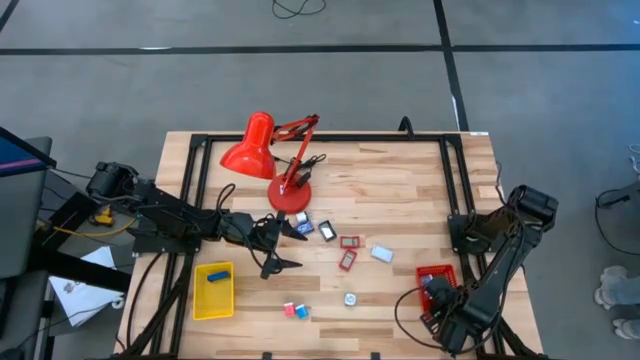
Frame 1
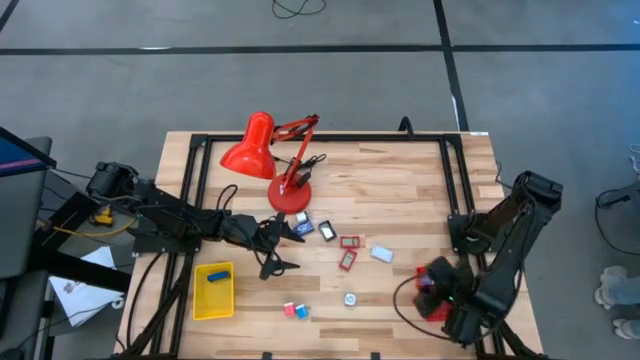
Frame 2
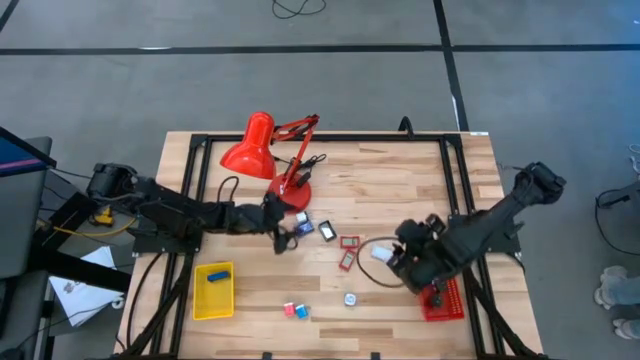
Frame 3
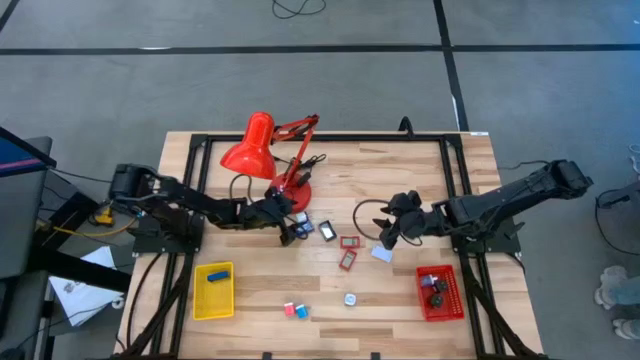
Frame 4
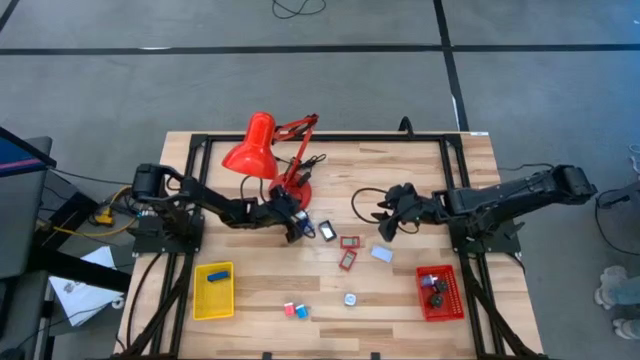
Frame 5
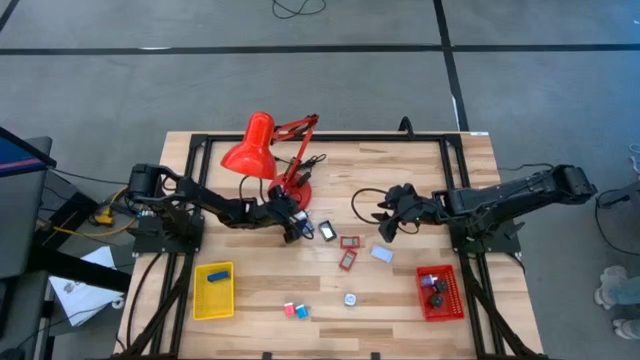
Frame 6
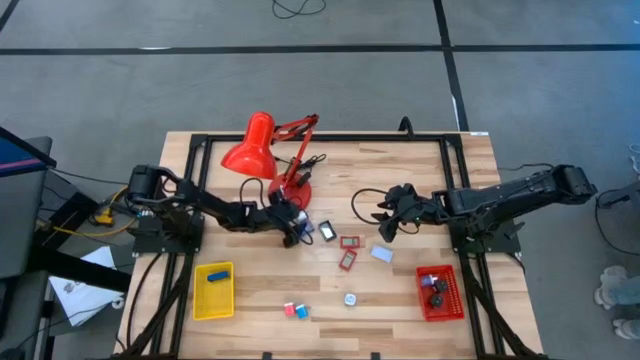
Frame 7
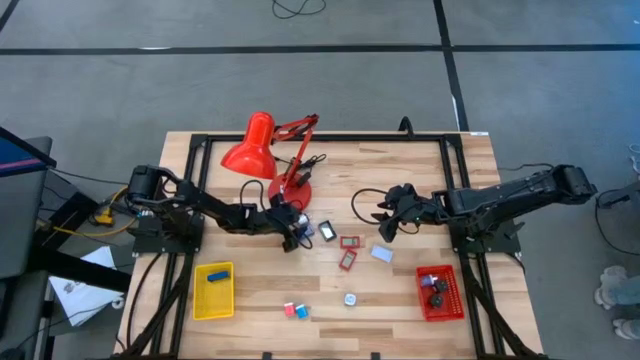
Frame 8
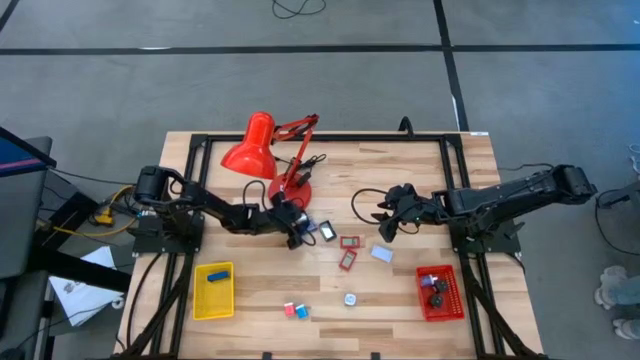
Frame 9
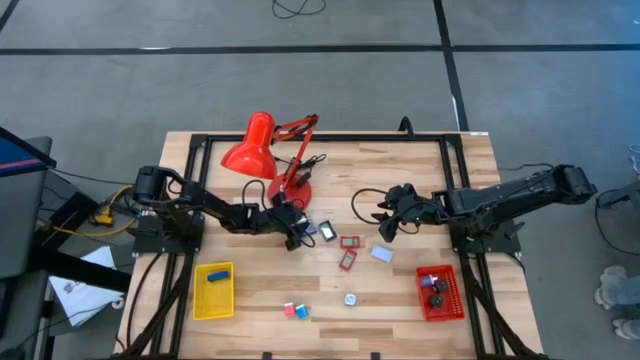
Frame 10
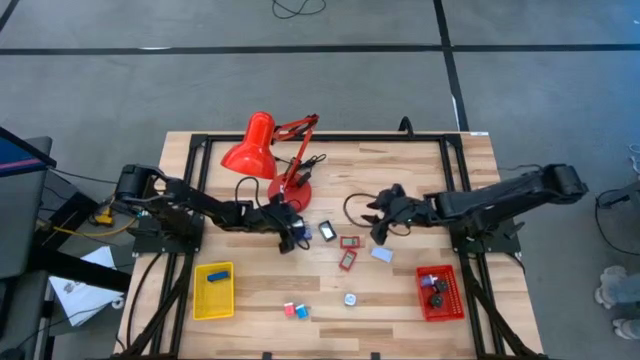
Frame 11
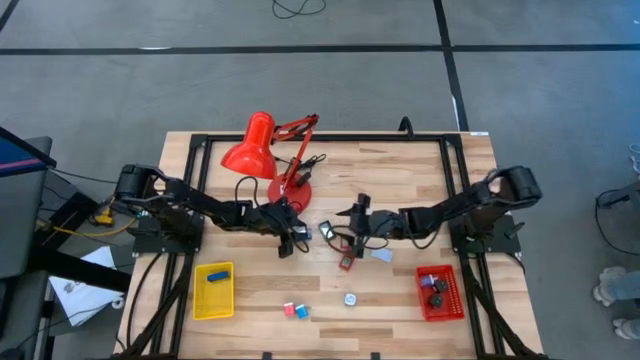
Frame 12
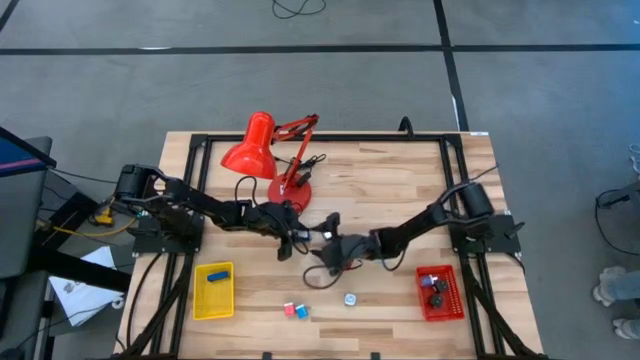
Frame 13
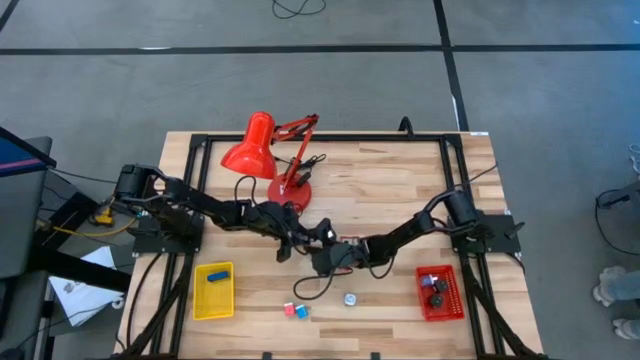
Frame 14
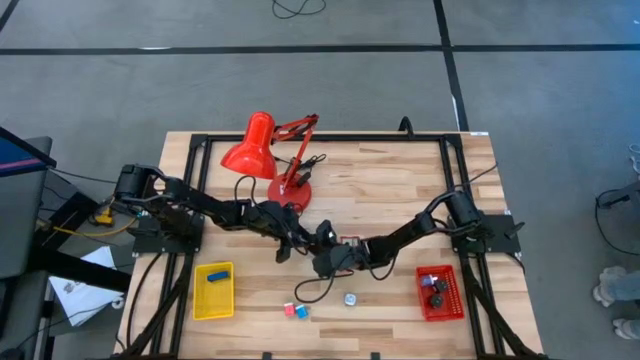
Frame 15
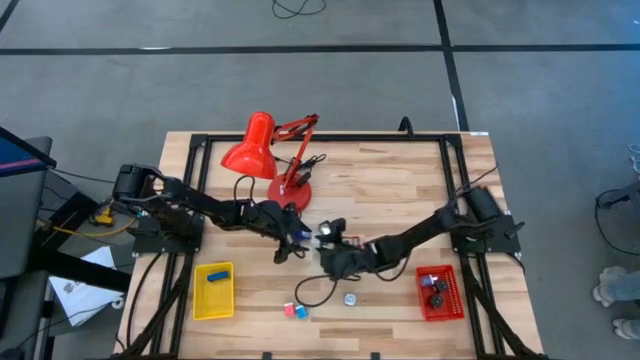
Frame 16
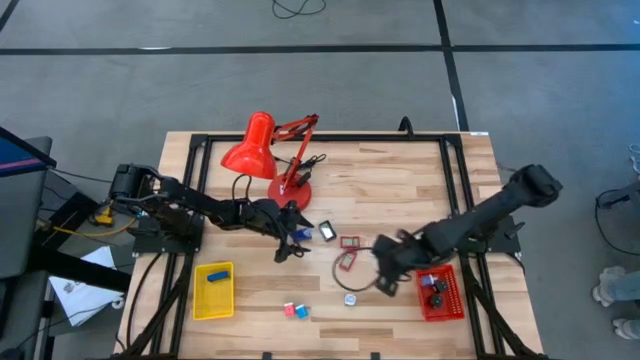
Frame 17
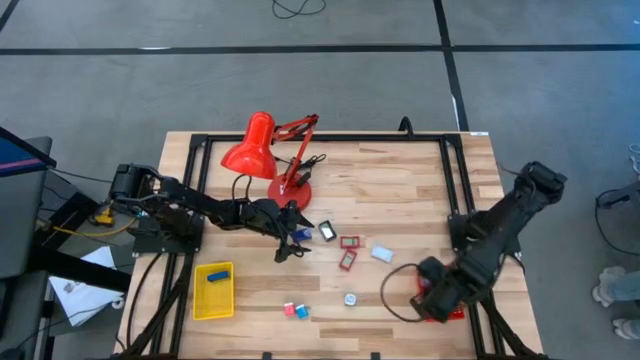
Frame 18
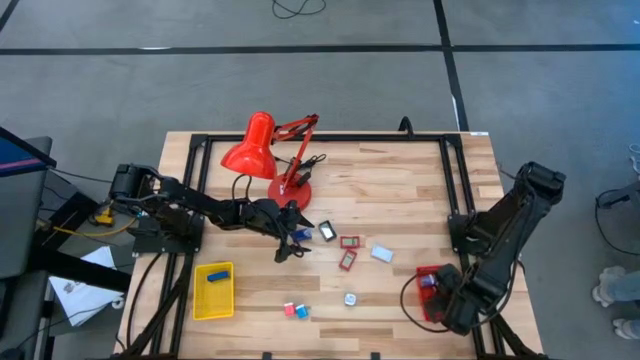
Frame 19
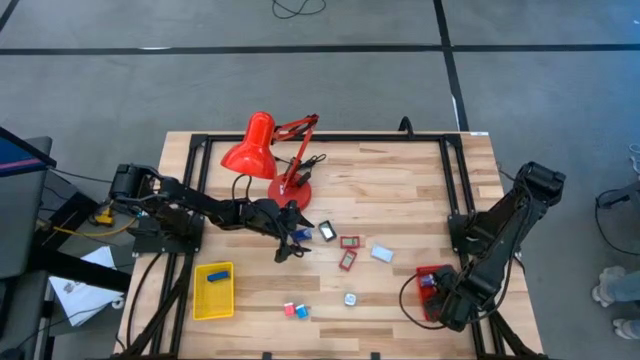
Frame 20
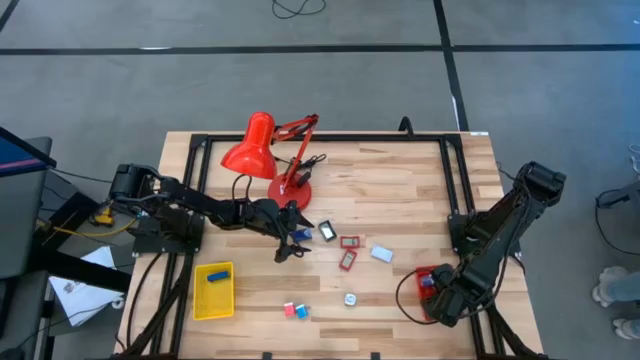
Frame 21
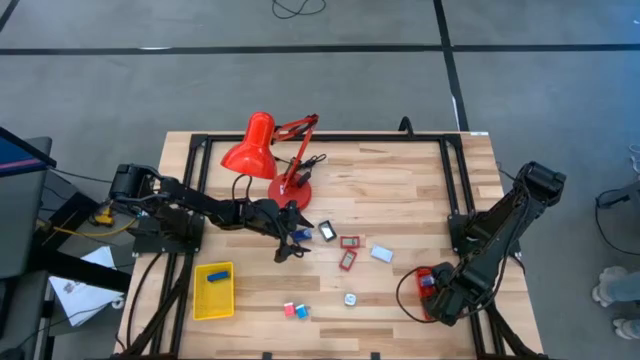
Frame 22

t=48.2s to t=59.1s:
Task: Pick & Place Office items
Put the white charger adapter into the red bin

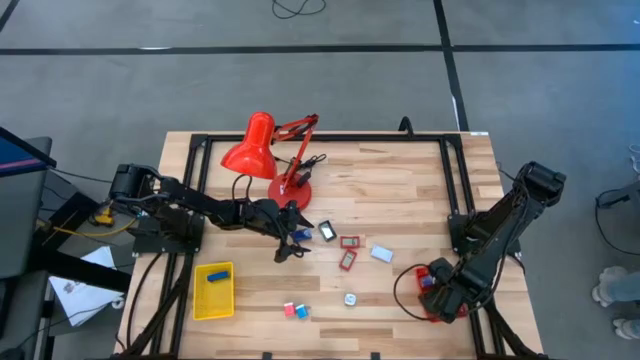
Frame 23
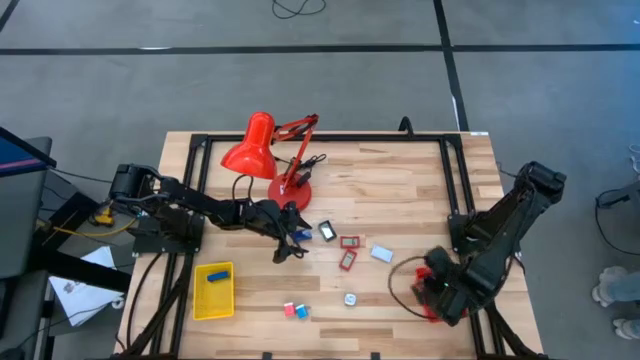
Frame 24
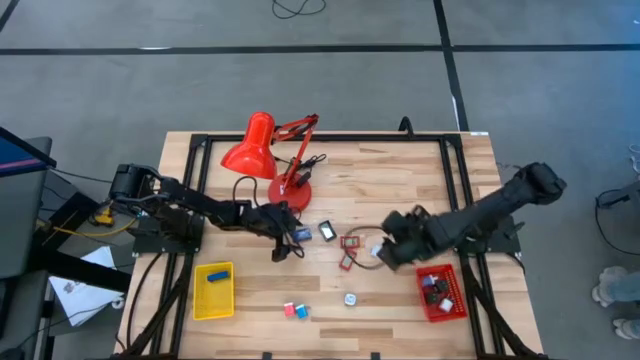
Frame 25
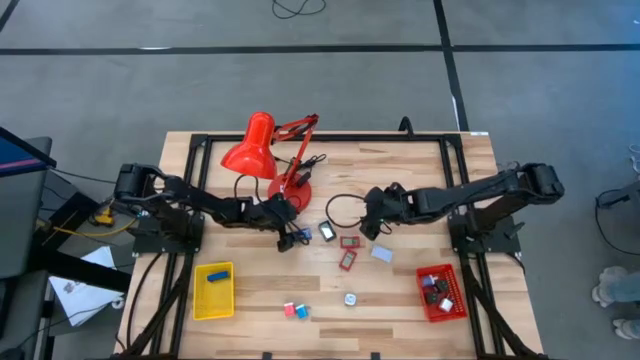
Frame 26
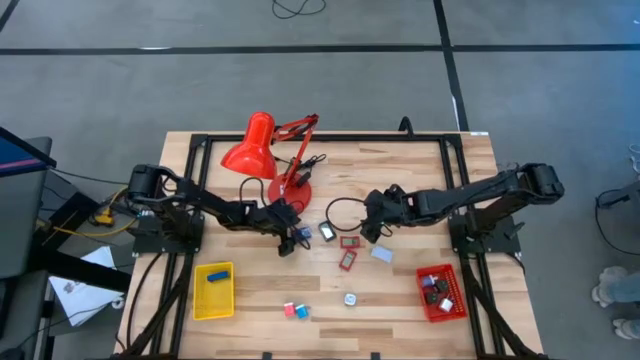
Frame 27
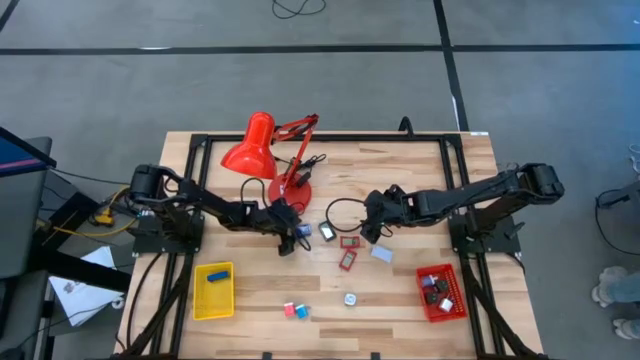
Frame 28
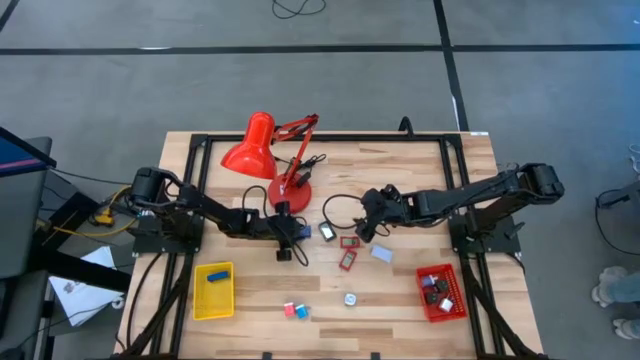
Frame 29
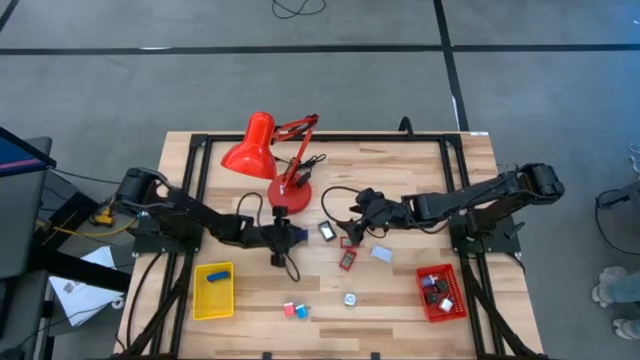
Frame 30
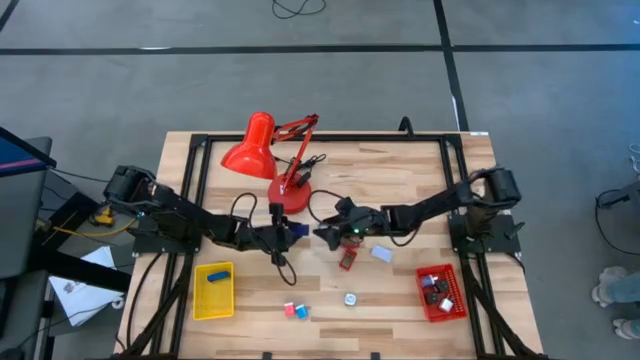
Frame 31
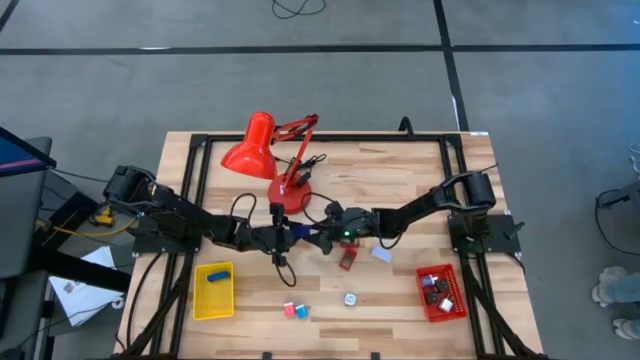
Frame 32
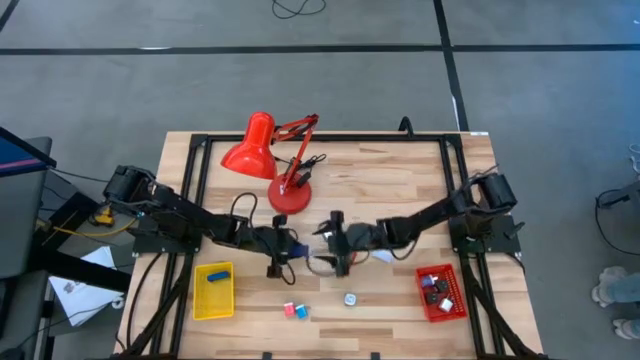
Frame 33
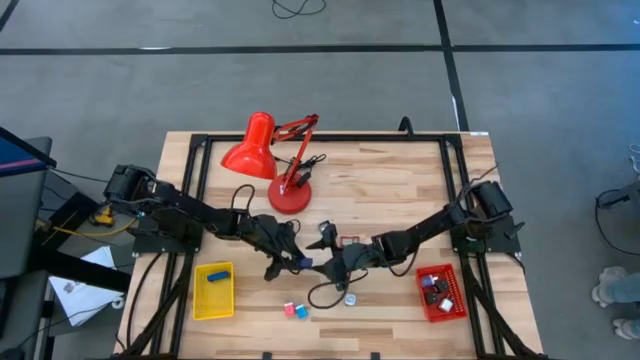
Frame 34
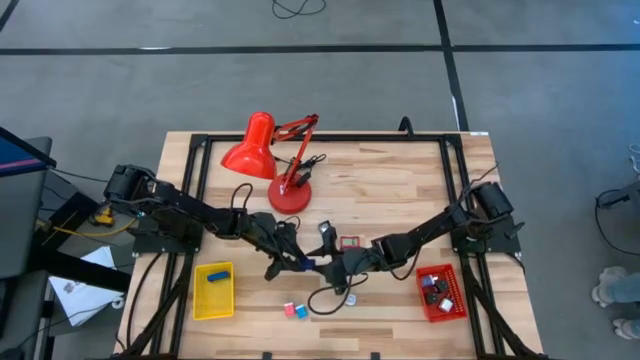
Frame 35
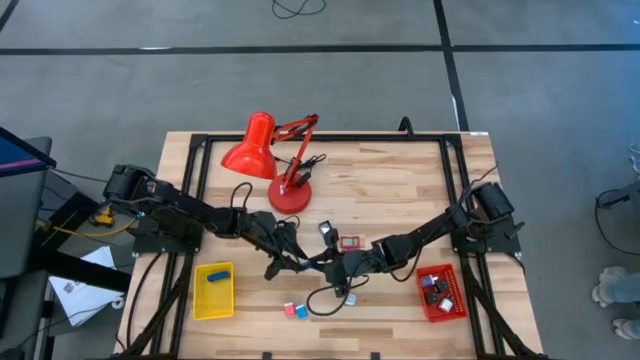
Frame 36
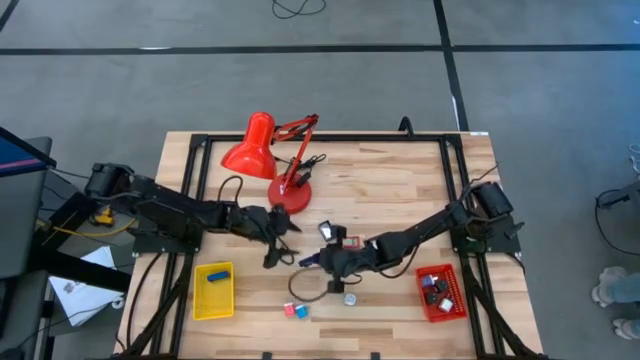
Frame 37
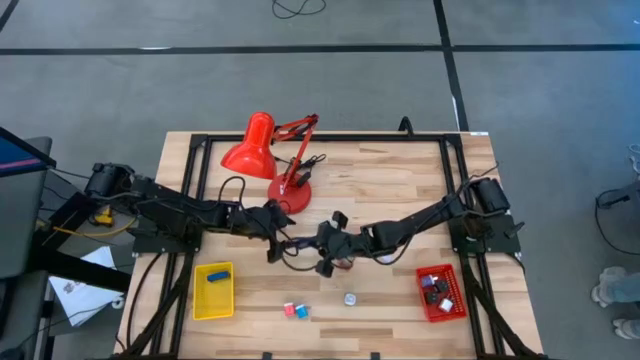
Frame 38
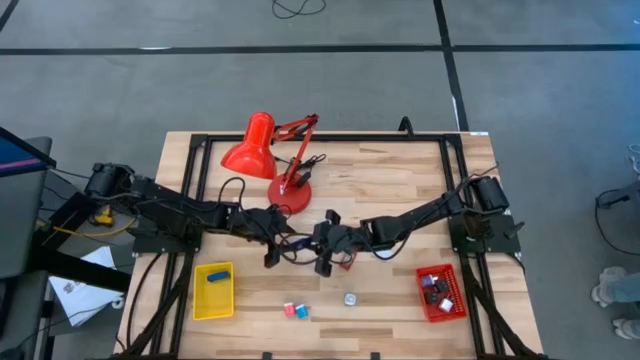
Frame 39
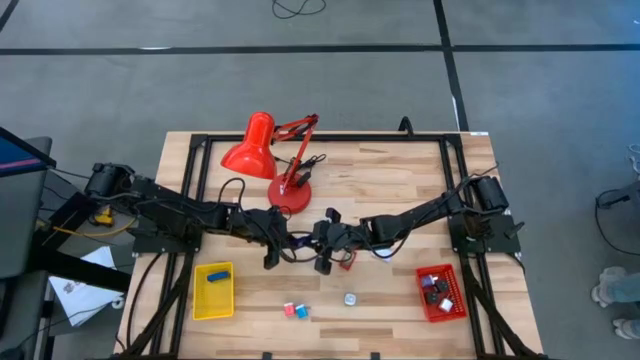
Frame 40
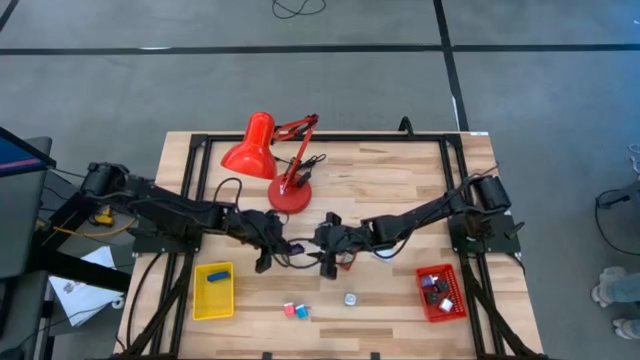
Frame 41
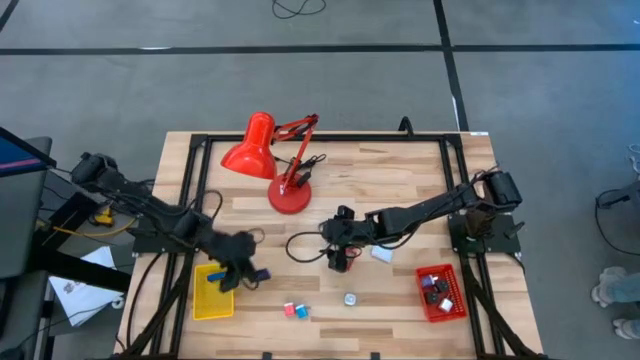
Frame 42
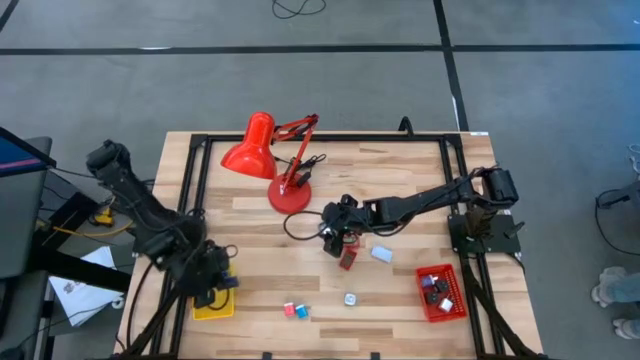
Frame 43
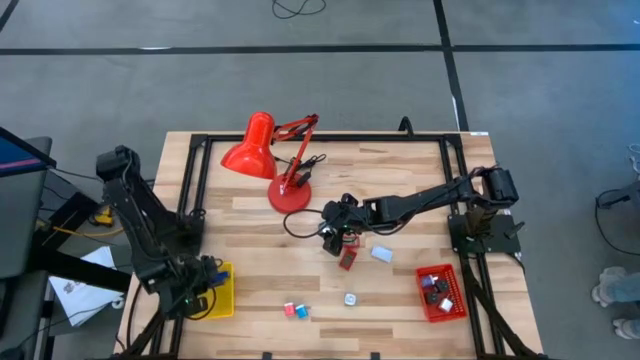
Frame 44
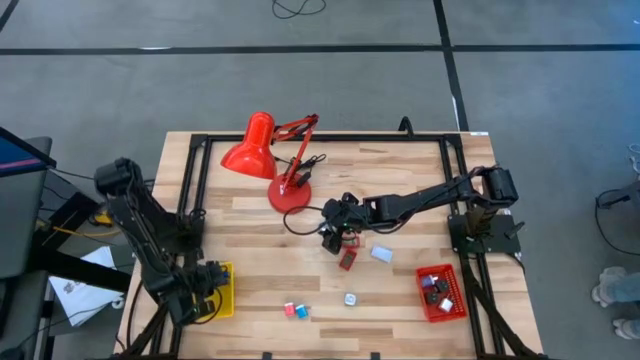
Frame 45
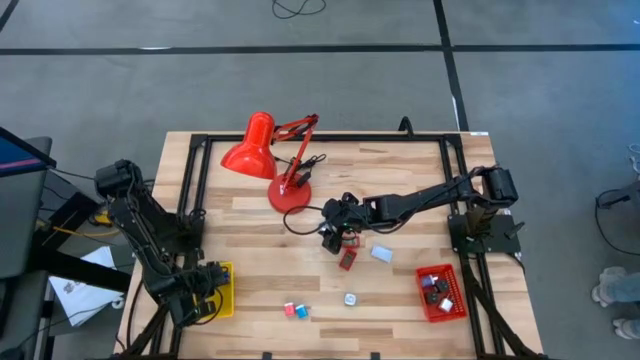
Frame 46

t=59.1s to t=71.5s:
Put the dark blue digital timer into the yellow bin
